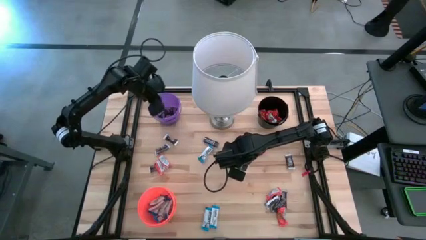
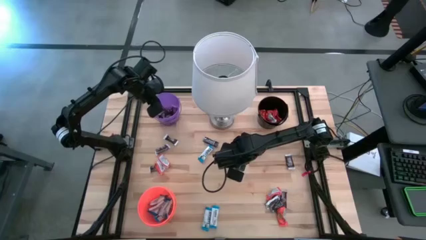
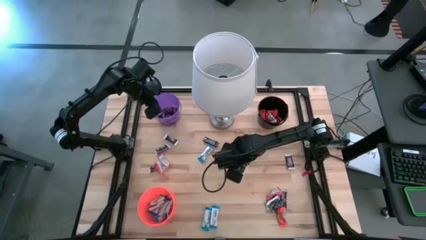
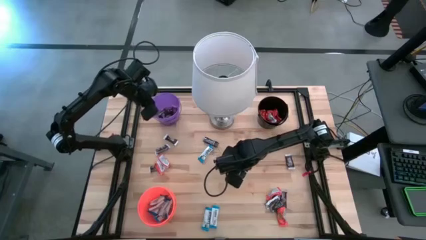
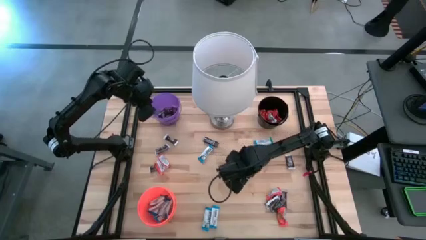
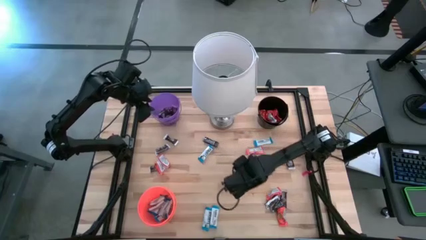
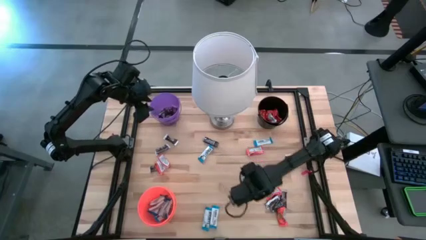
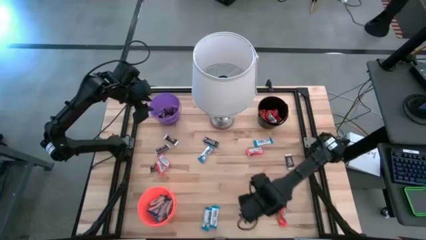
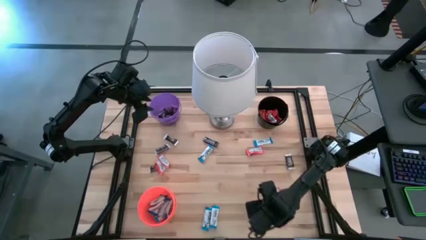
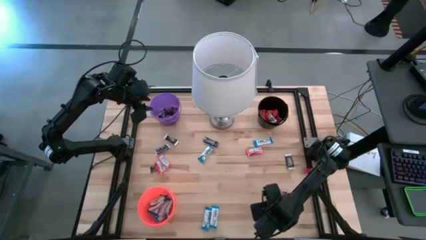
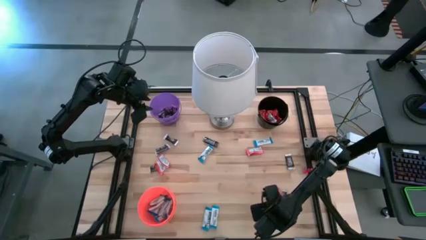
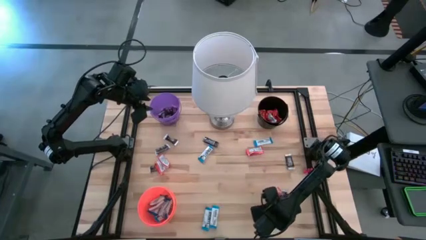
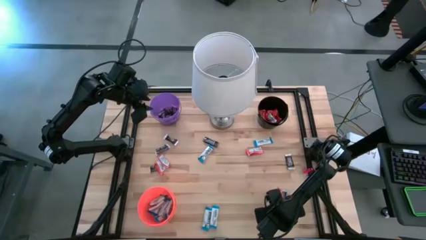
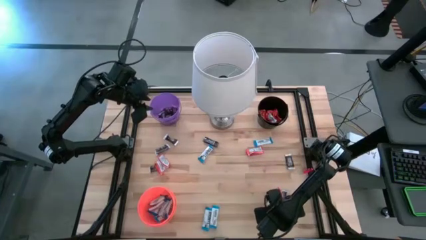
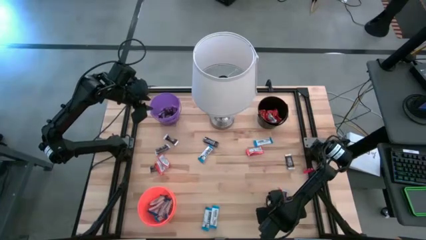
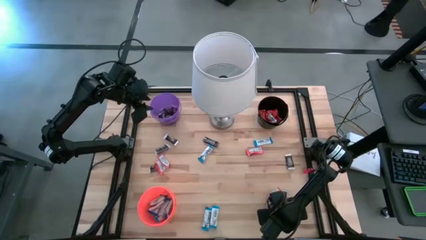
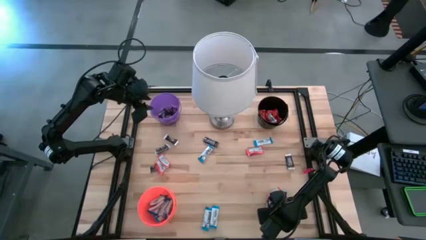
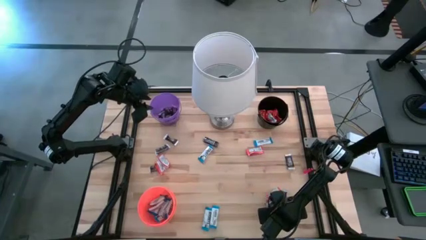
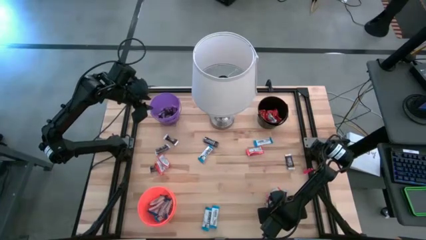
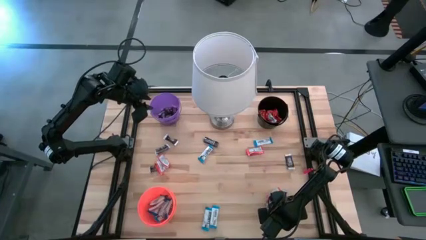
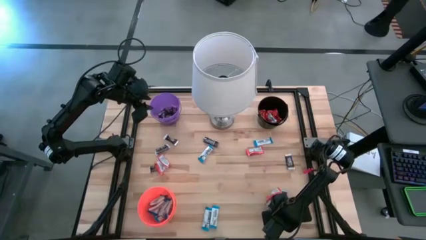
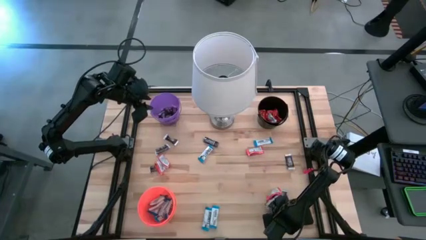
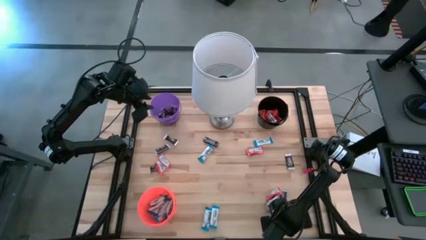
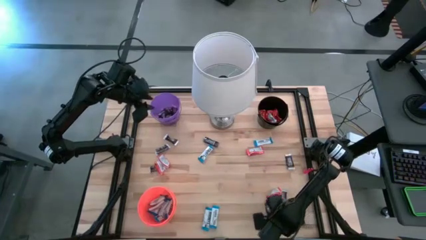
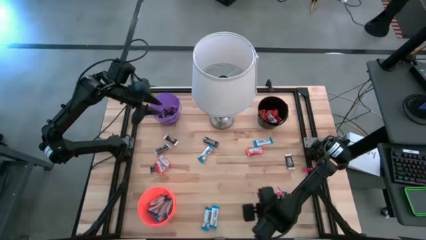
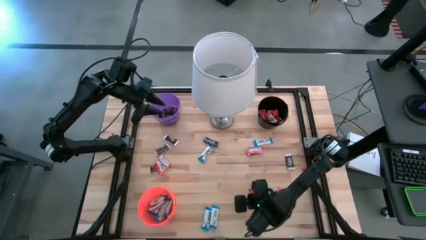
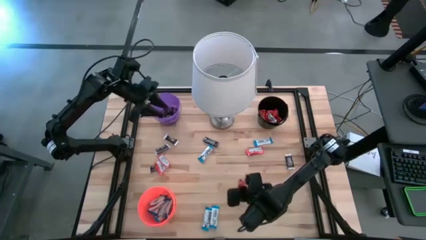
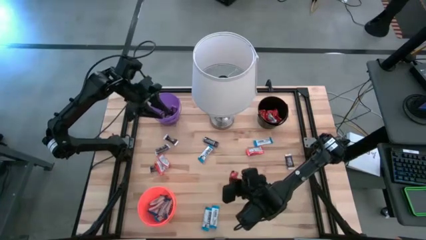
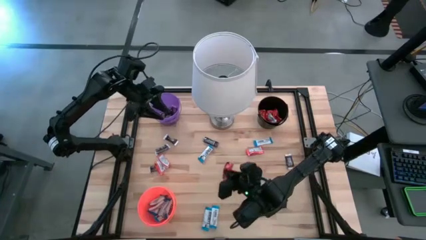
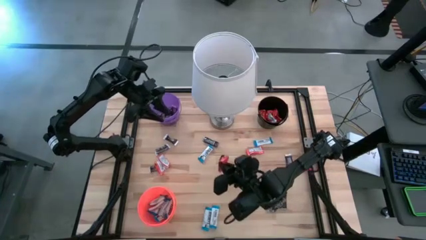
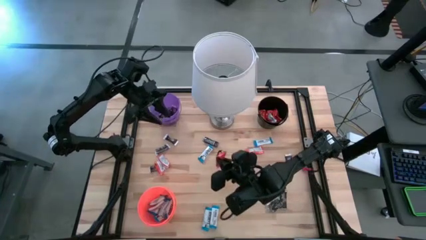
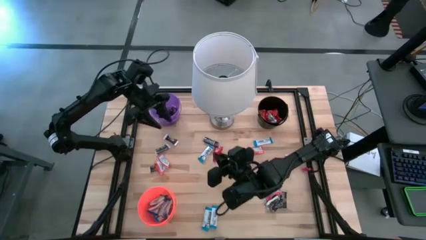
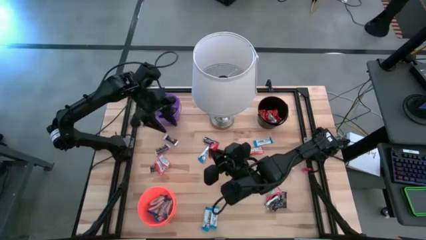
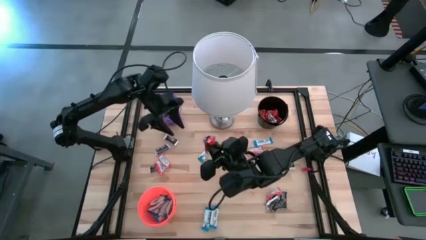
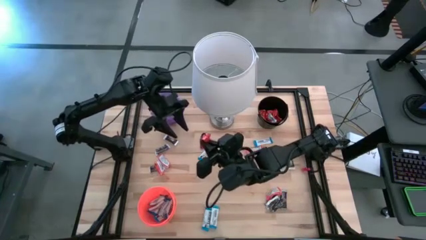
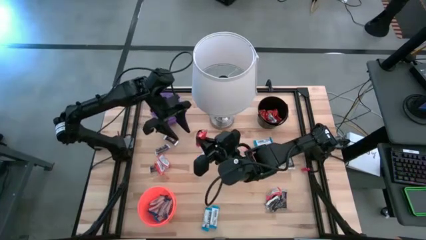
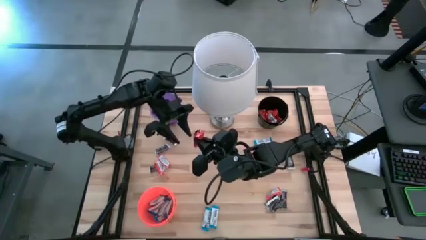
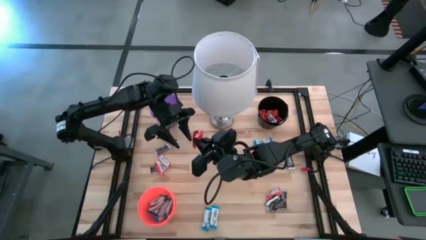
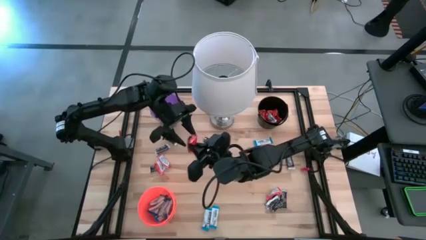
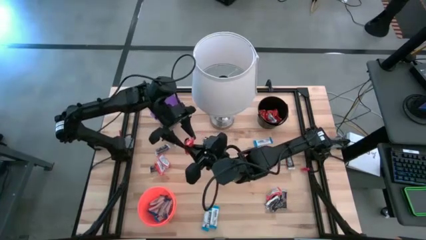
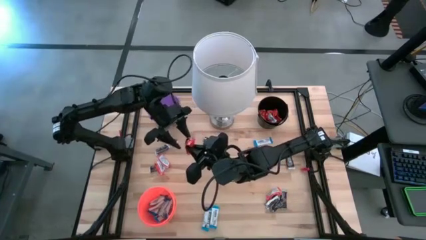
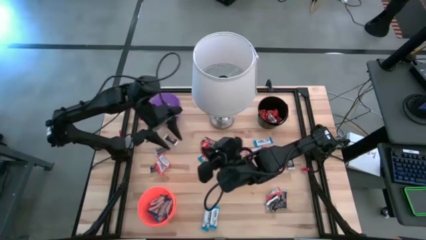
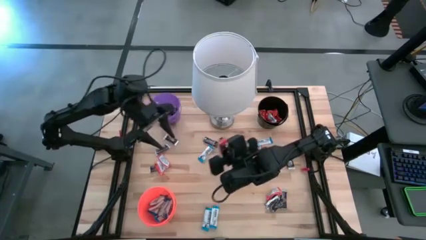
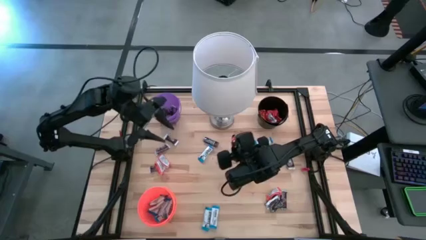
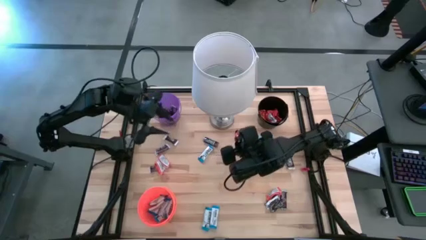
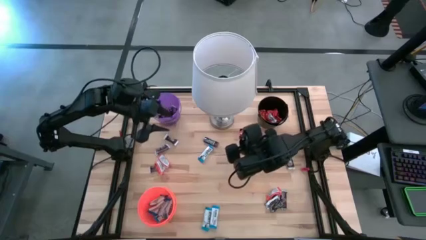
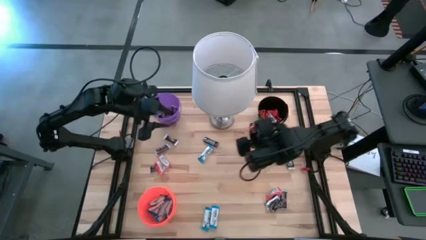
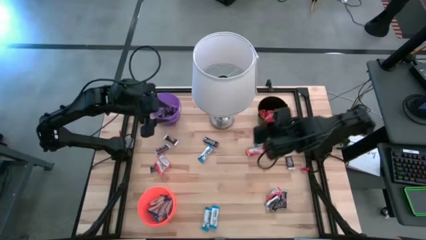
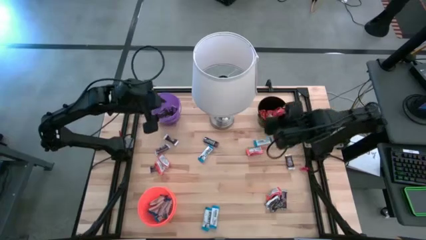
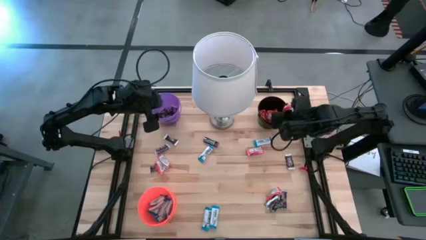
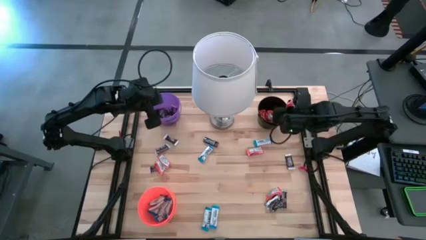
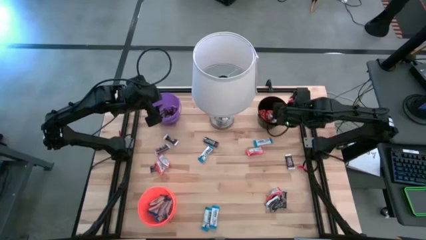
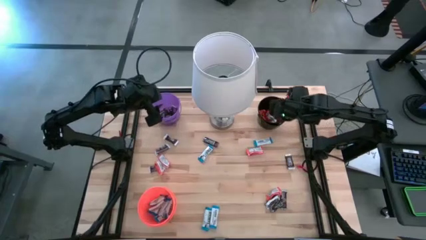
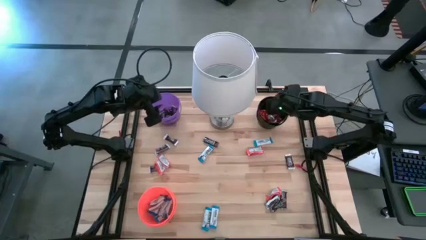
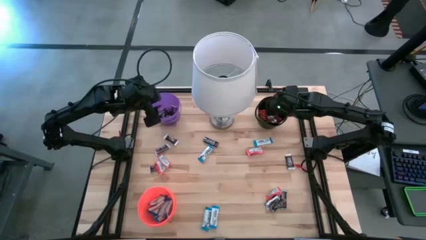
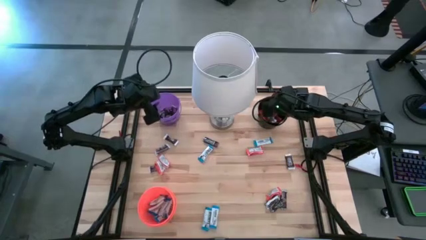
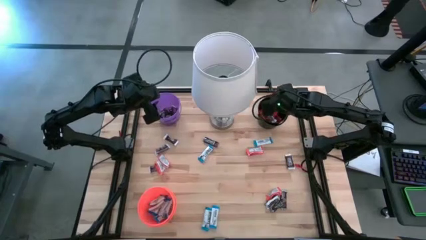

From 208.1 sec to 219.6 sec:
Task: Organize candy in baskets
Put the orange chocolate bar into the black bucket

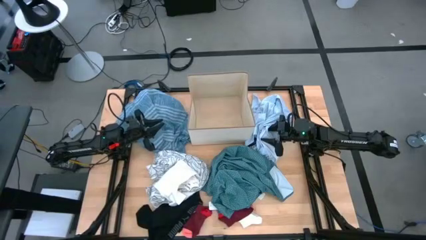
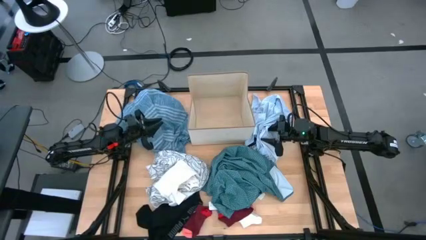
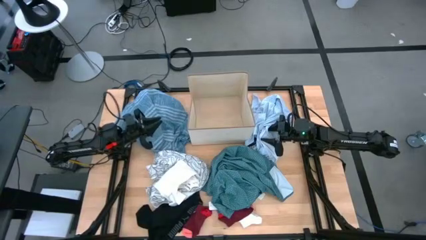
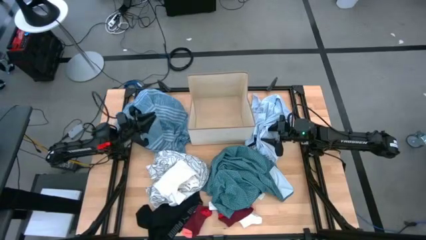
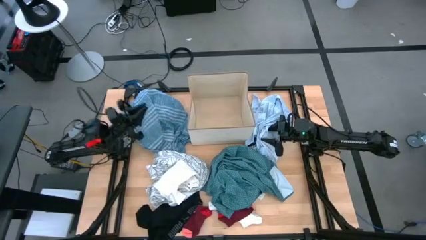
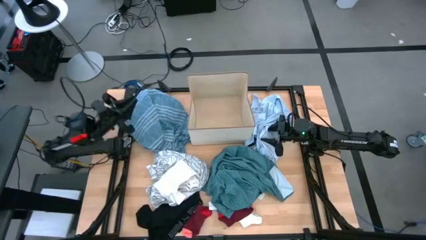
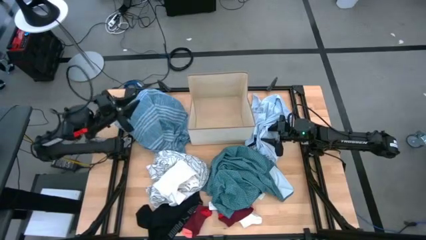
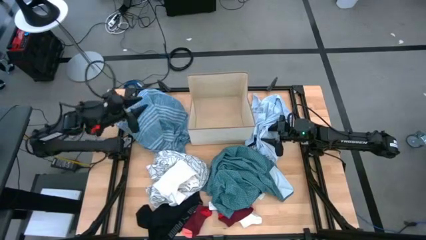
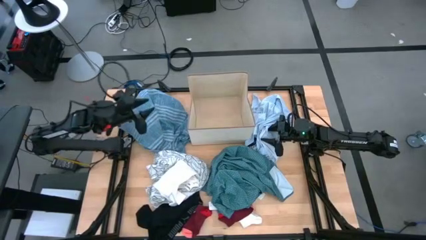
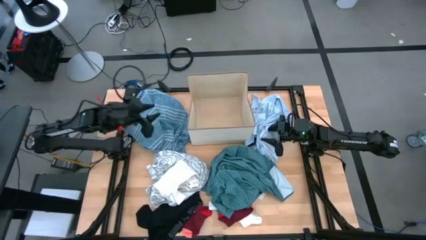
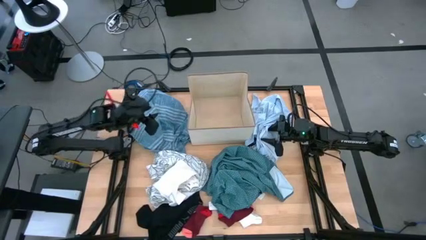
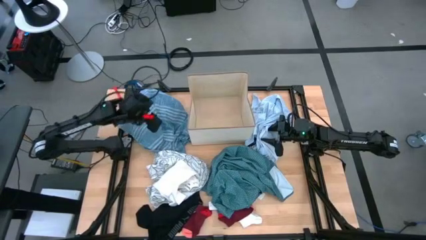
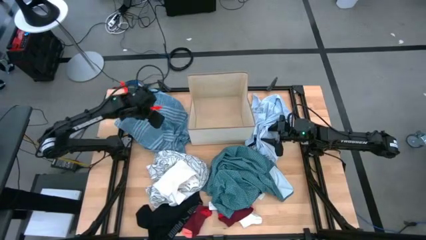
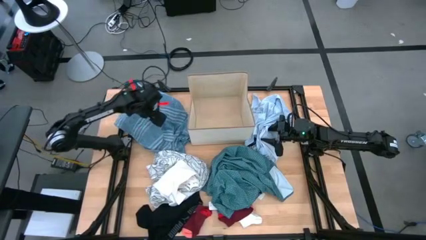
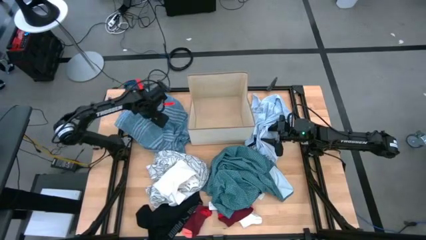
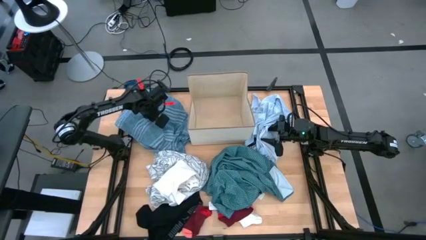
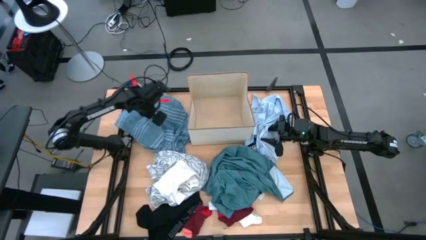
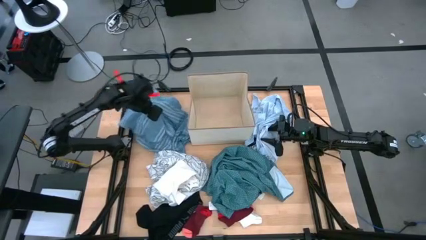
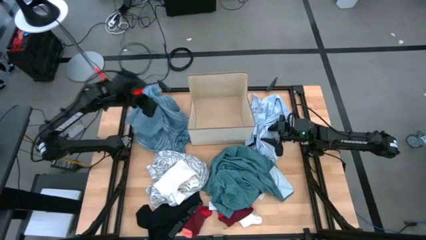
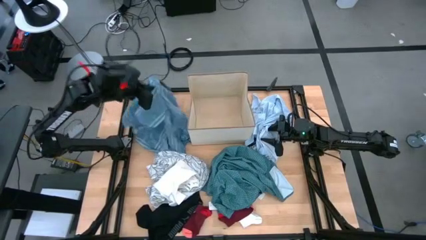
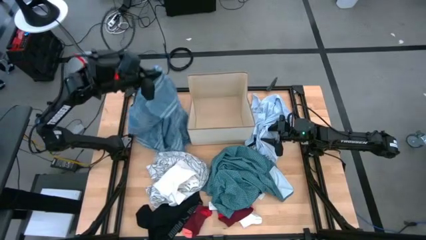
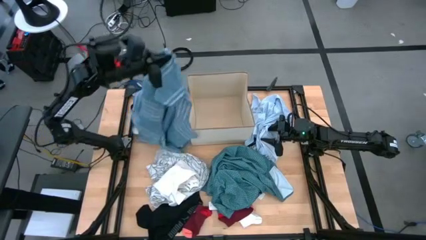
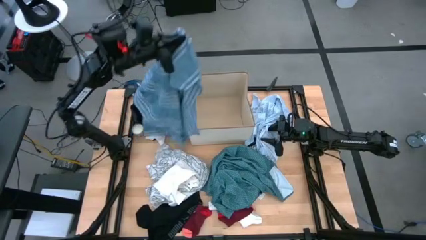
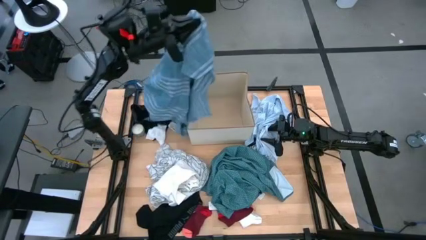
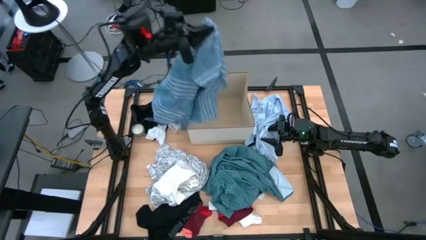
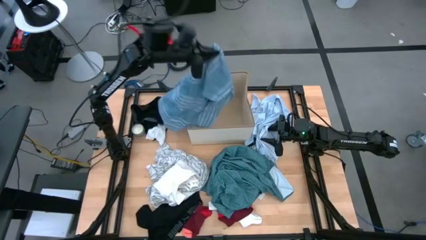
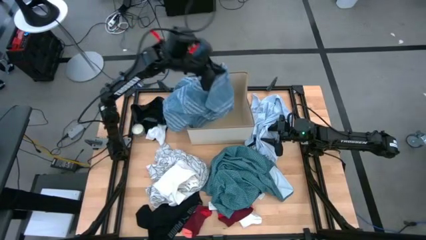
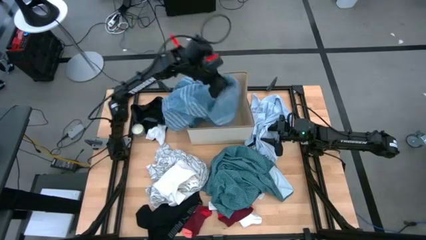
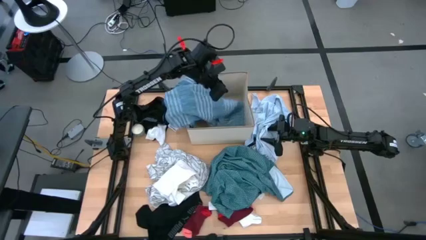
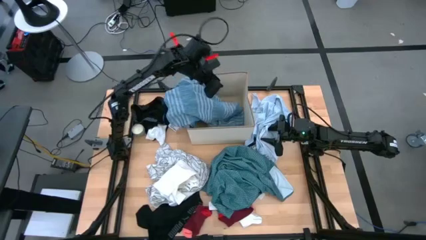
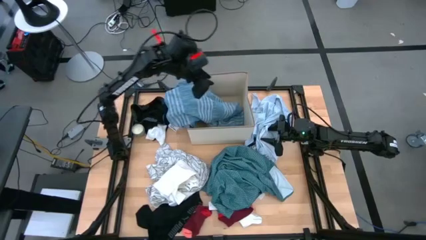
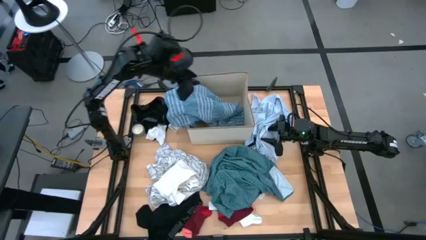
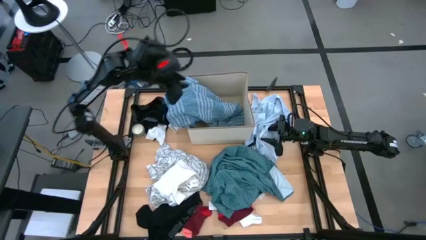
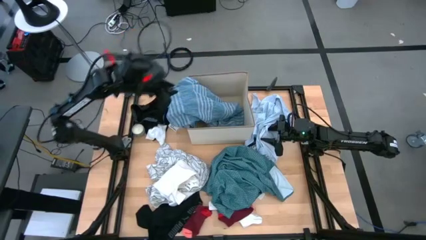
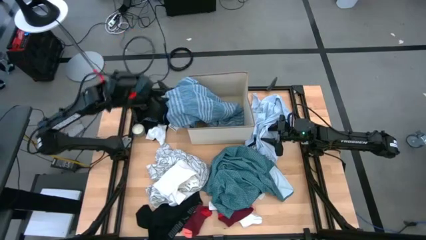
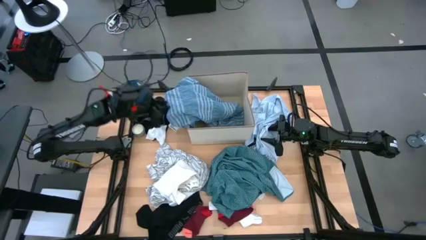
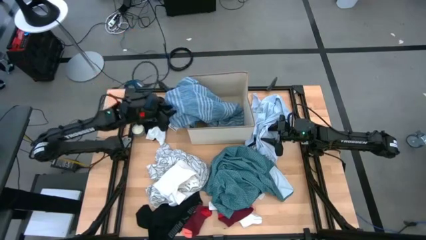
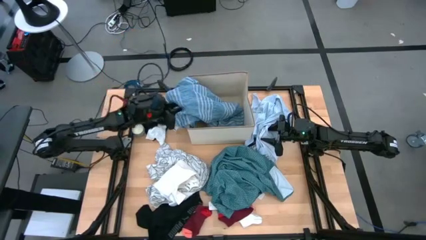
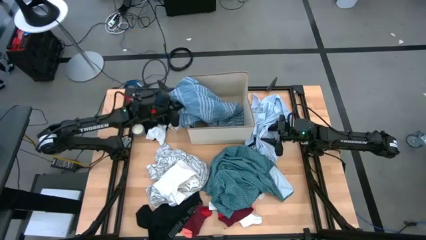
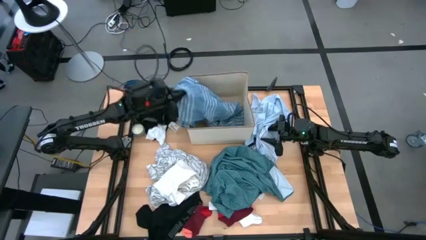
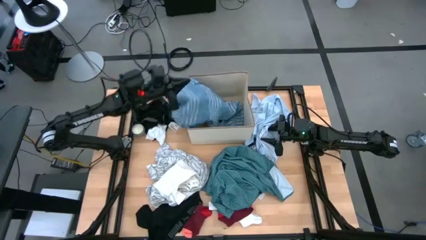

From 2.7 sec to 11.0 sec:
Task: Sort clothes
Put the dark blue shirt into the laundry organizer
